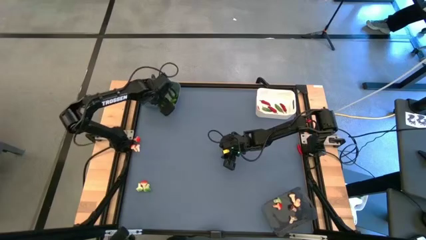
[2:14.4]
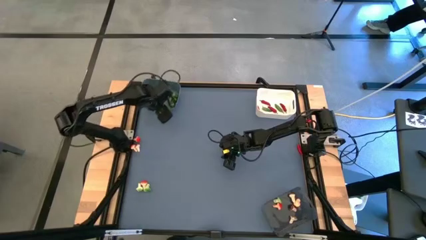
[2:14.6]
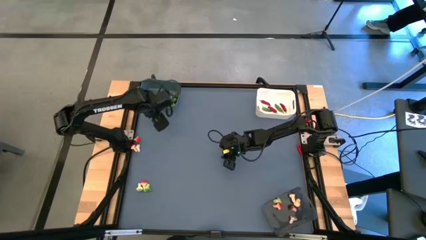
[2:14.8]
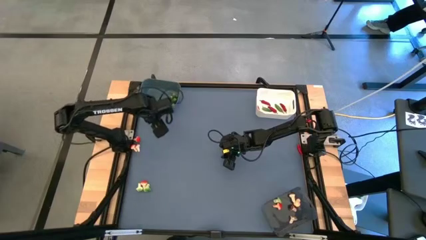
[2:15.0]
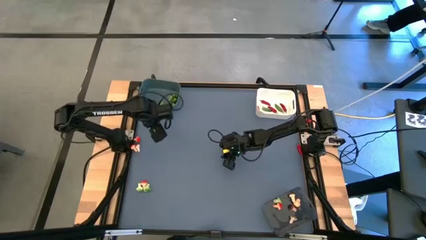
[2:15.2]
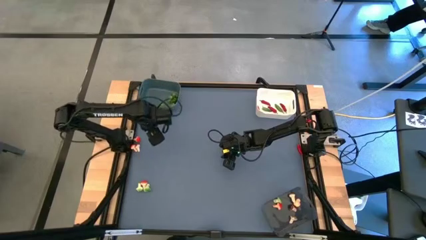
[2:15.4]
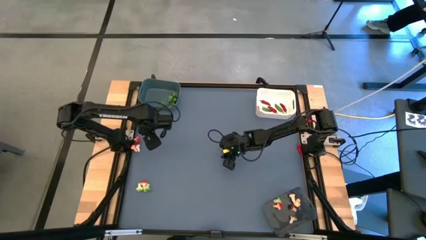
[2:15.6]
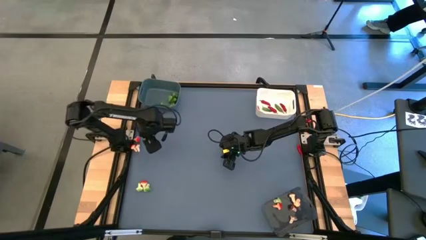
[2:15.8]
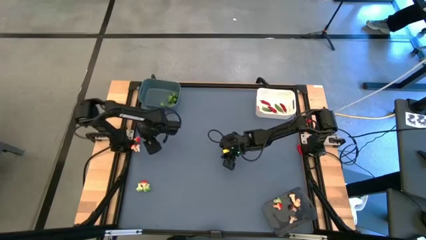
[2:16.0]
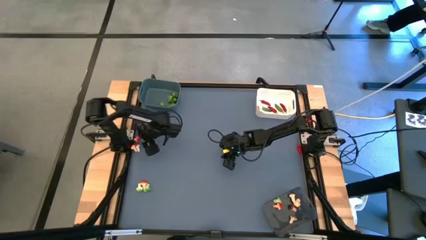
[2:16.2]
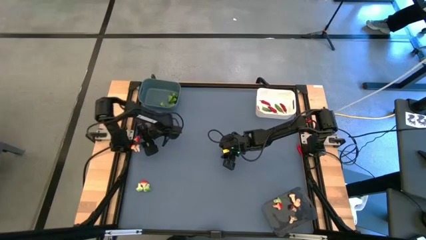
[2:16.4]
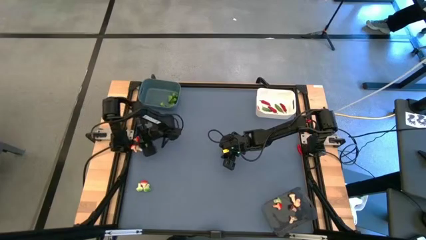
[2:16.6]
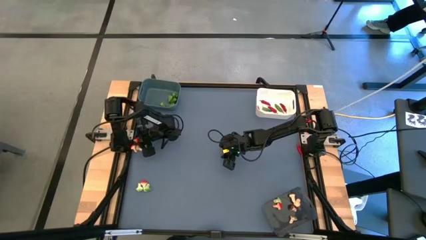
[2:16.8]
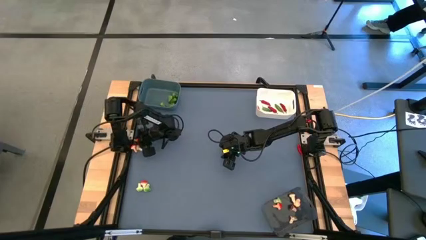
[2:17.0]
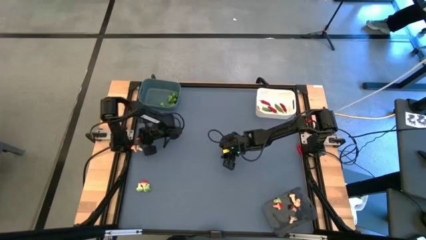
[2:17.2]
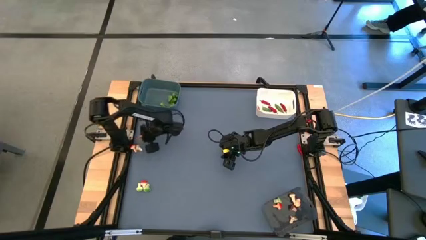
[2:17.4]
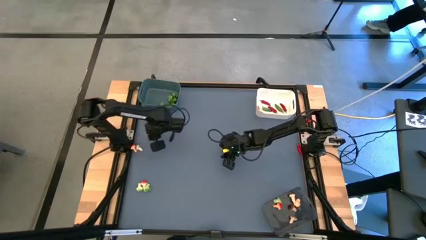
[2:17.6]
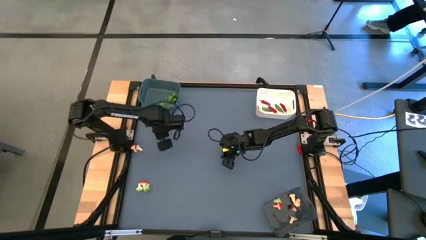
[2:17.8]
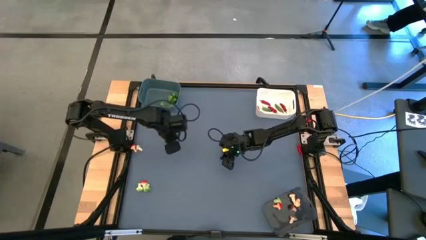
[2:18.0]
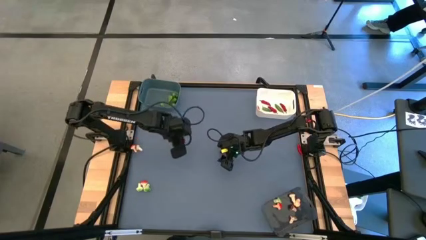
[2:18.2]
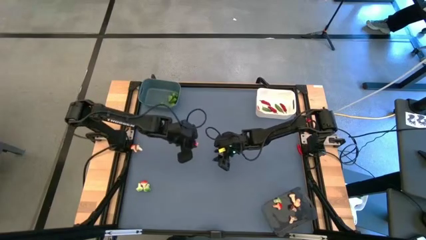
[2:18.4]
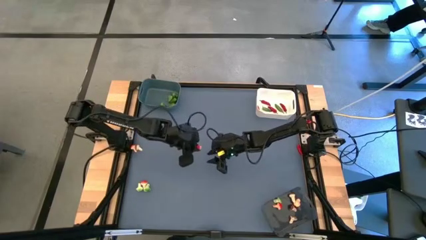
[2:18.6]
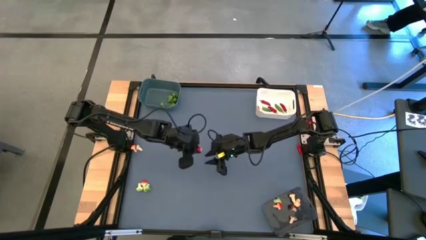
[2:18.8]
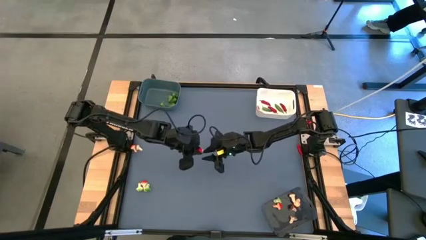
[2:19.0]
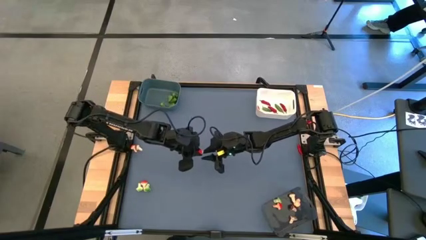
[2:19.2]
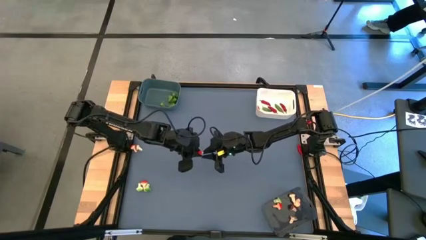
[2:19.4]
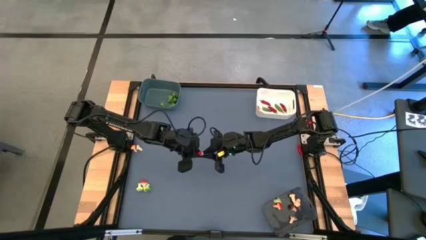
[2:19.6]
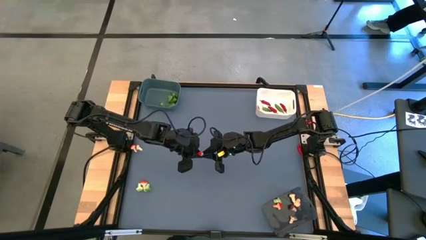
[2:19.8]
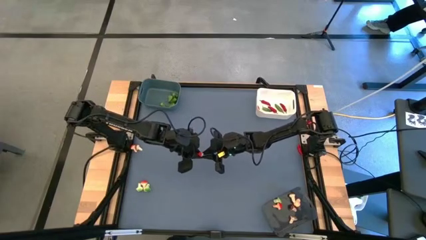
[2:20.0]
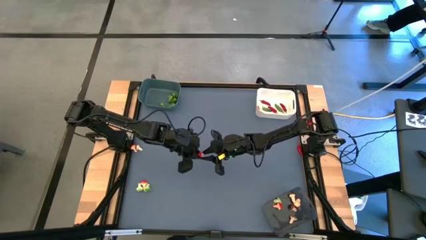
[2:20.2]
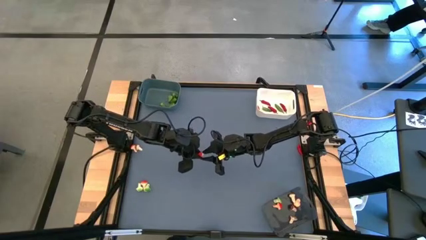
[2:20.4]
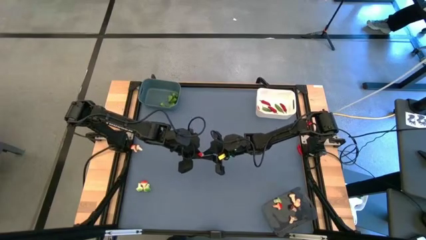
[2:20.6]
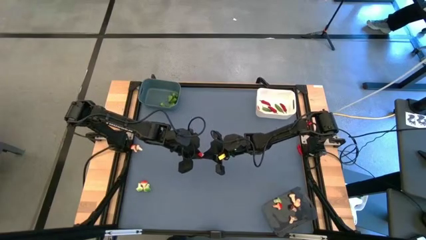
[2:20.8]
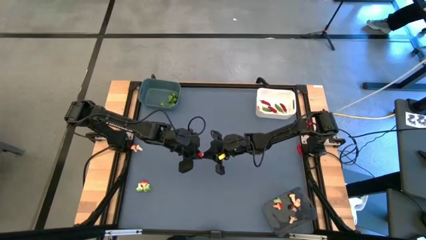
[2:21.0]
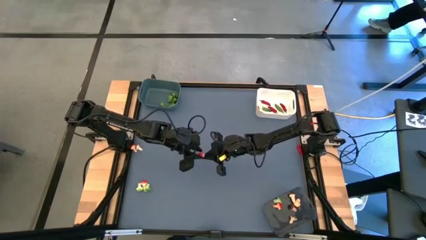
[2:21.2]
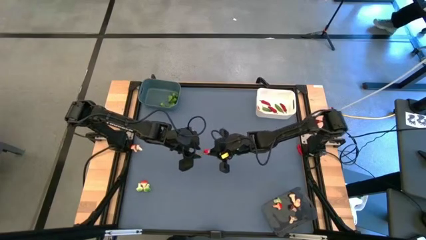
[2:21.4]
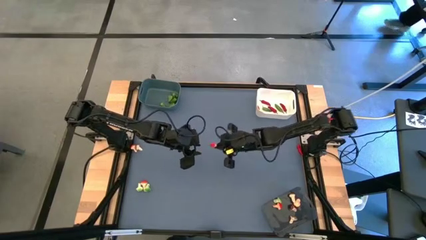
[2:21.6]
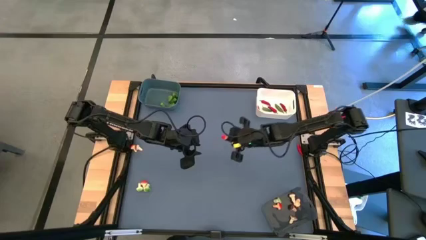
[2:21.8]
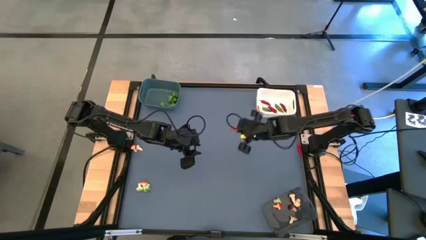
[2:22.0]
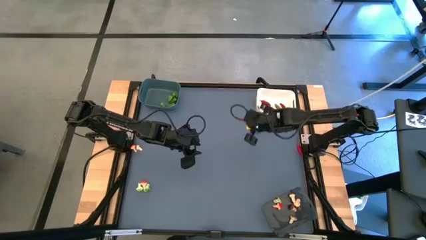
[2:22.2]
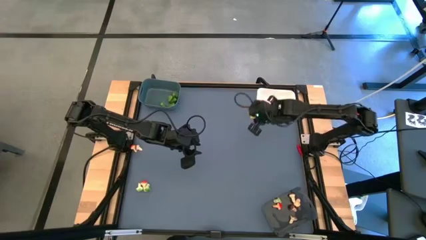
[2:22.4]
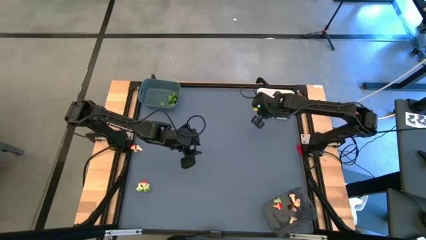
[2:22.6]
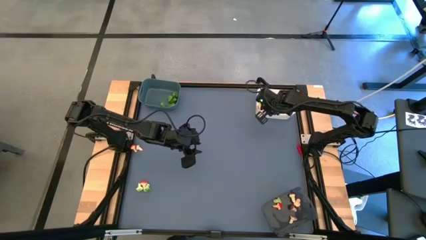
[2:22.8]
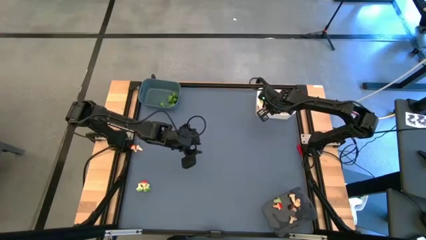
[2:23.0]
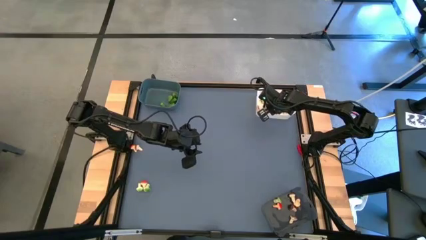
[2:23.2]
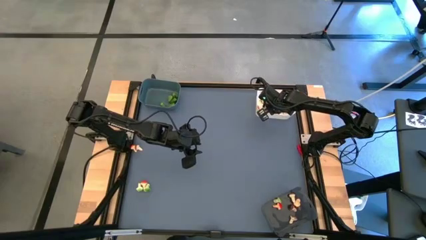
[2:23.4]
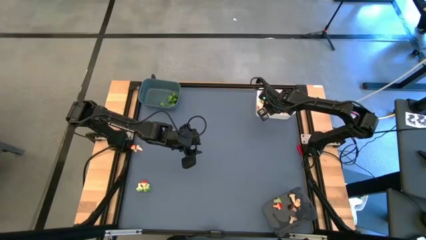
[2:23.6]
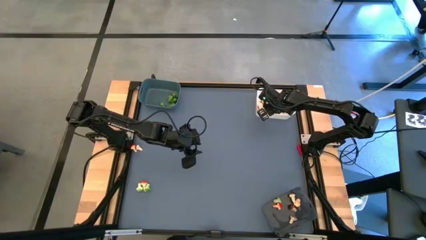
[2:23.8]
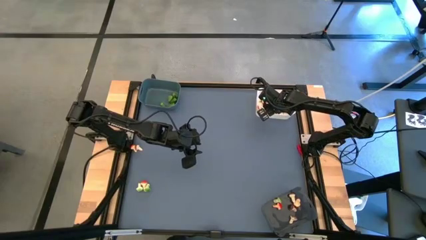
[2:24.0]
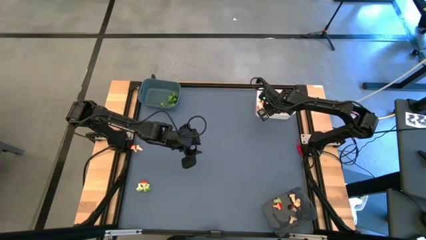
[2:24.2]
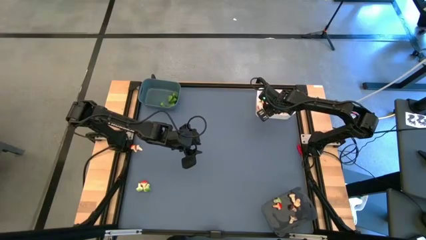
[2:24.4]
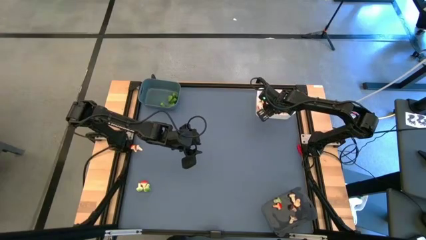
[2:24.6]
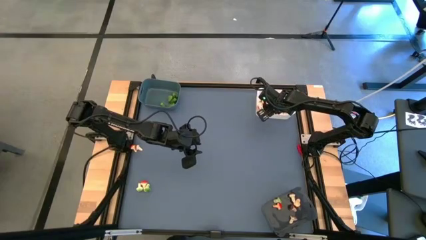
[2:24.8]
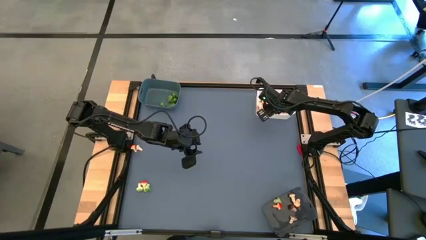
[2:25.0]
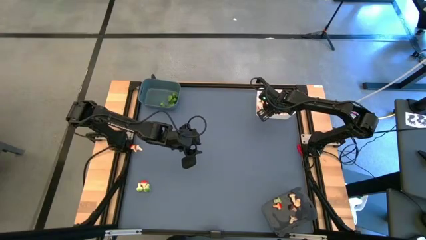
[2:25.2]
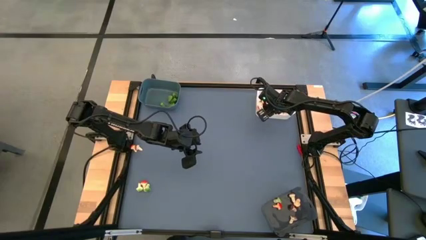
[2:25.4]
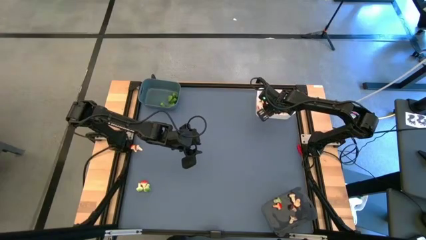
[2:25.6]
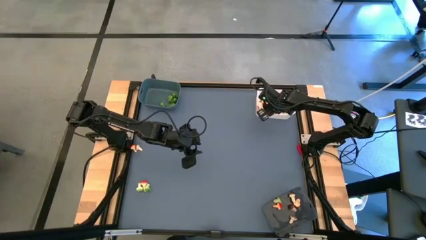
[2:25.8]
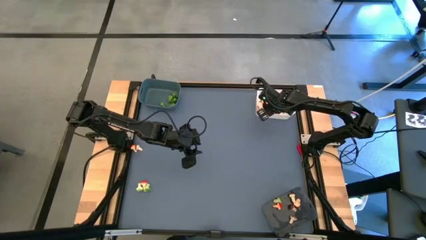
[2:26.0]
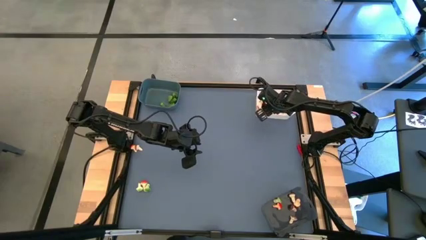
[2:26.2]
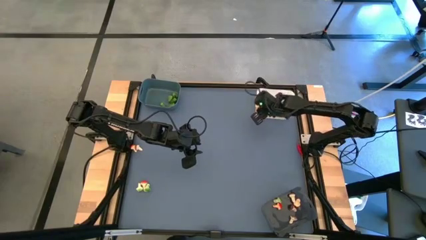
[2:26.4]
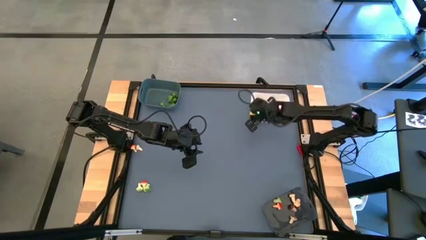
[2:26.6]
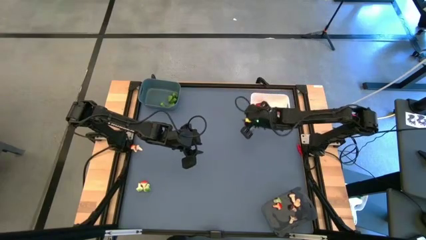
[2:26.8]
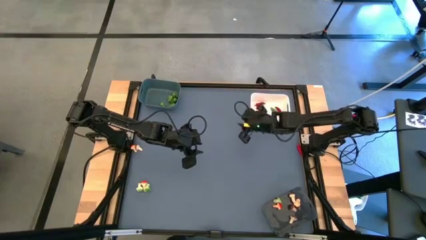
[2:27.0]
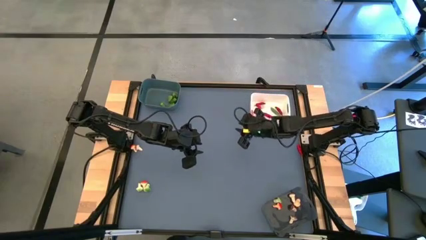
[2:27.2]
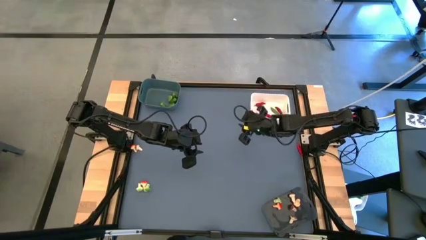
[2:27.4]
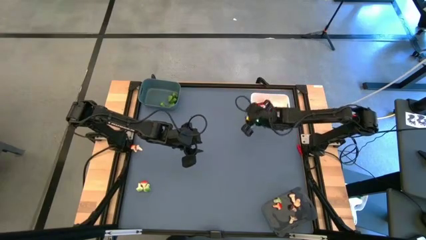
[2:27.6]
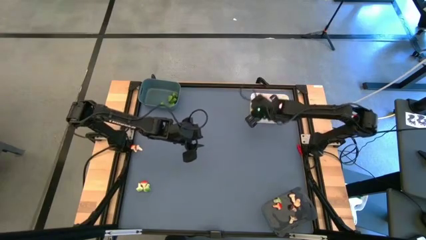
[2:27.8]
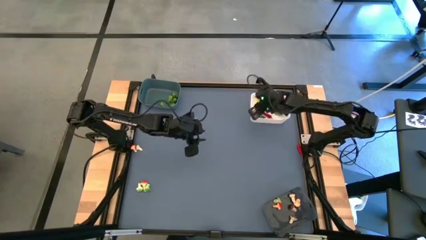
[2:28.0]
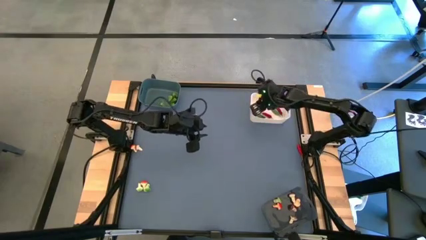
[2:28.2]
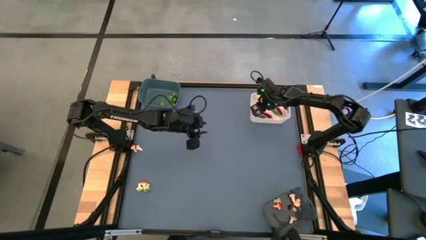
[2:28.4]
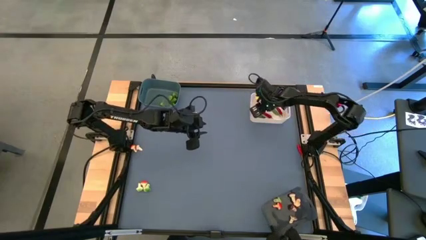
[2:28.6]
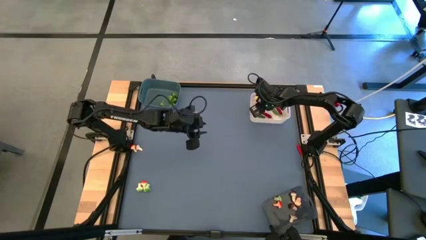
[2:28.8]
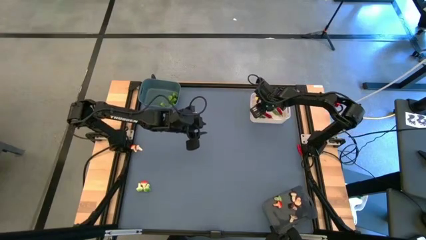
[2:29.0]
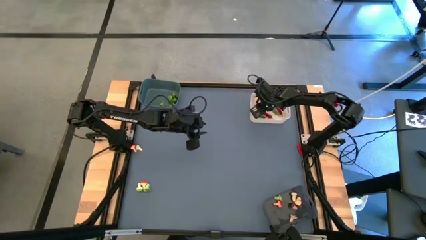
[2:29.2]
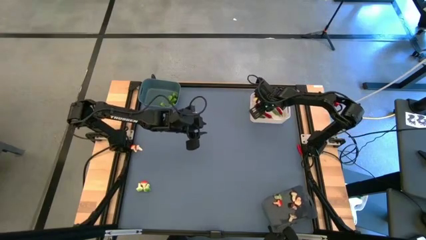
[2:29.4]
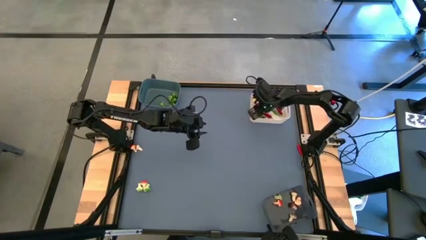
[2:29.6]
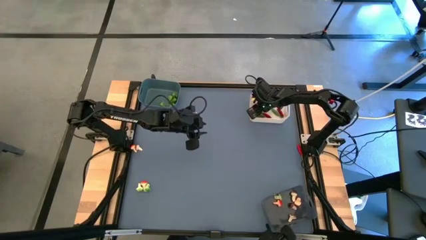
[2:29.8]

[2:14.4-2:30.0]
Task: Sort produce into baskets
Put the brown mushroom into the black bin

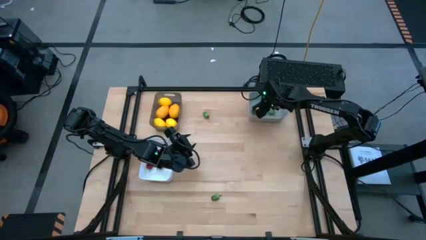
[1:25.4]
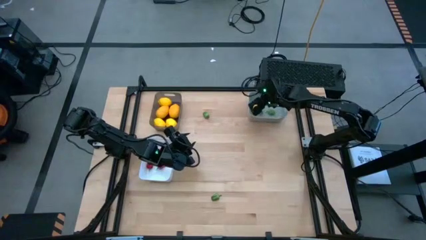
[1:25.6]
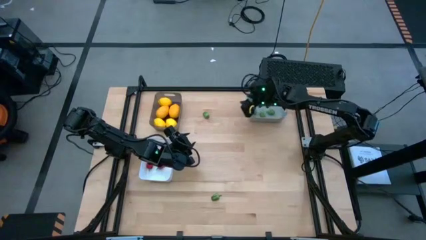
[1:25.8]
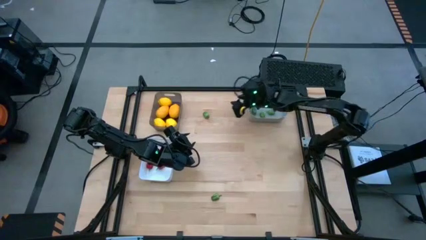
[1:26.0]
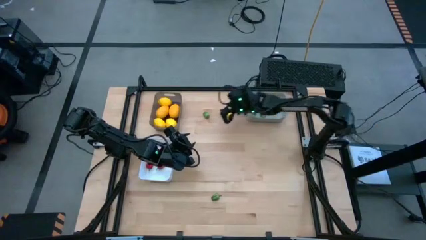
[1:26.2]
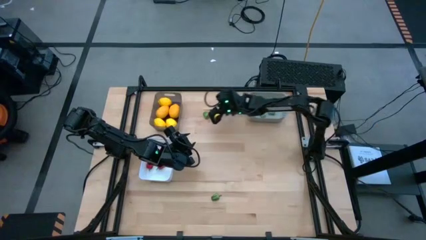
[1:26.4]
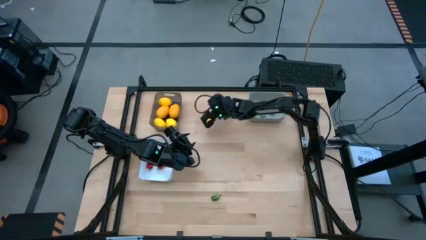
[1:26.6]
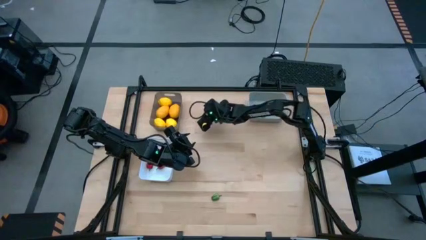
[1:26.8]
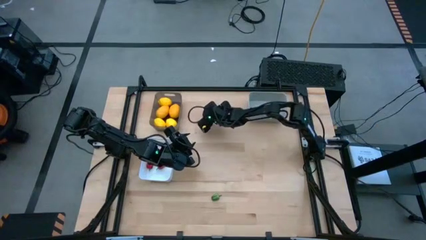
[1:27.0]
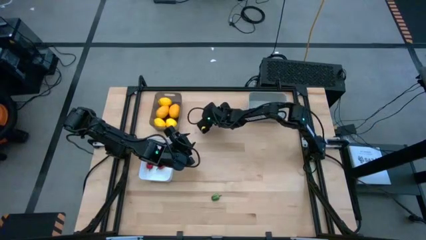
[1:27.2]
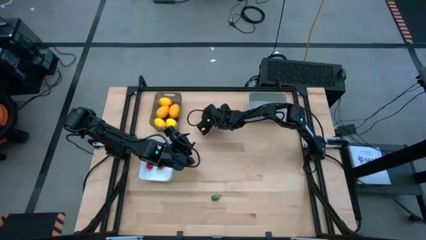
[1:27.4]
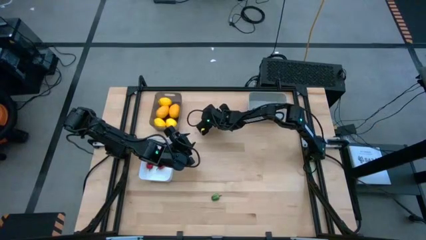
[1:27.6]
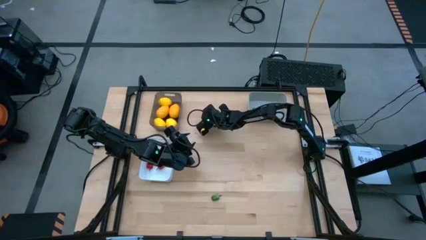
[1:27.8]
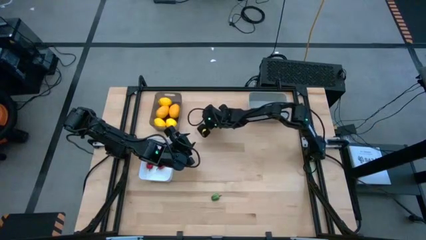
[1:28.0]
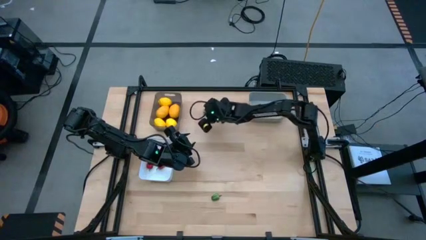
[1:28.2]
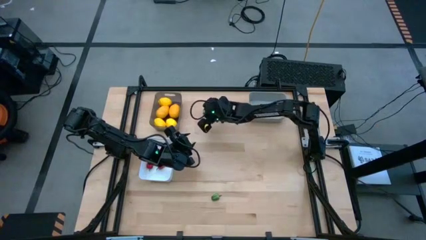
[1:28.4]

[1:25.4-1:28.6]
Task: Sort produce into baskets
Put the top green chili pepper into the gray bin
